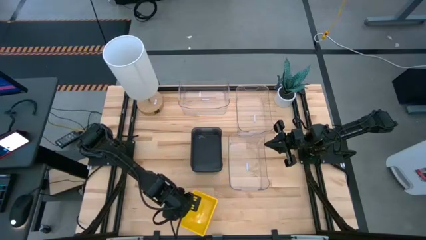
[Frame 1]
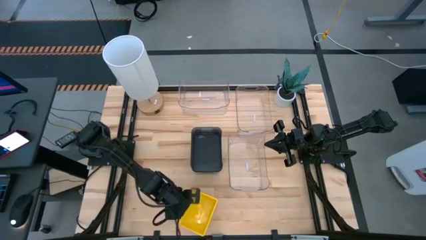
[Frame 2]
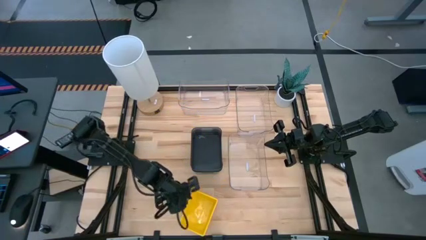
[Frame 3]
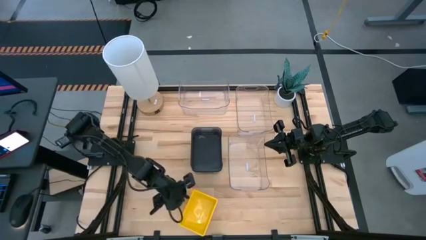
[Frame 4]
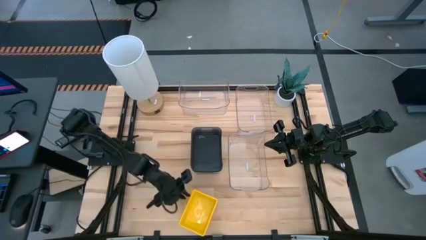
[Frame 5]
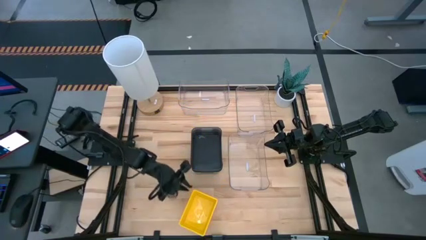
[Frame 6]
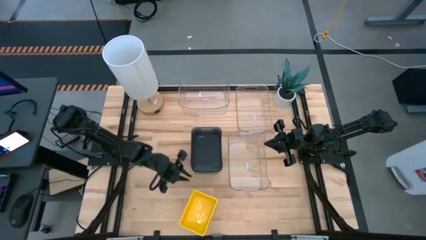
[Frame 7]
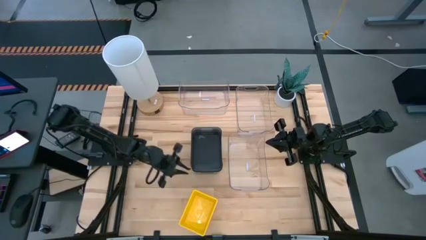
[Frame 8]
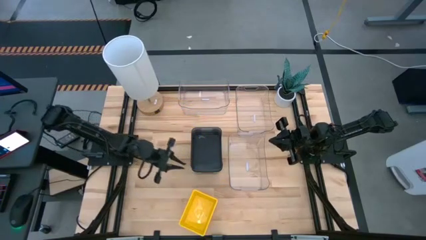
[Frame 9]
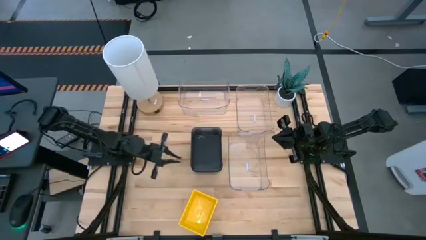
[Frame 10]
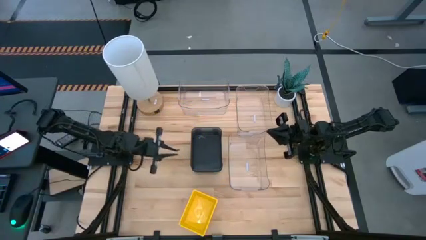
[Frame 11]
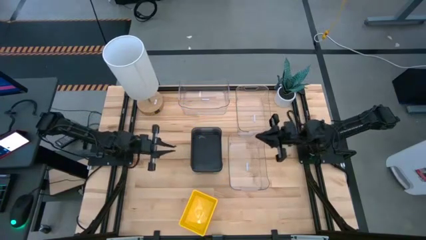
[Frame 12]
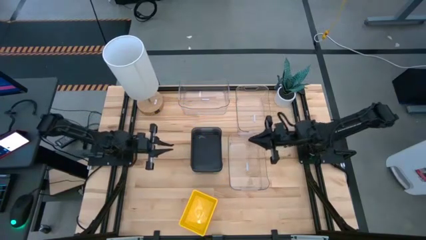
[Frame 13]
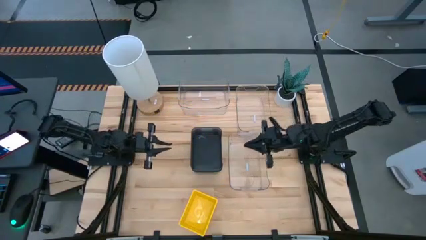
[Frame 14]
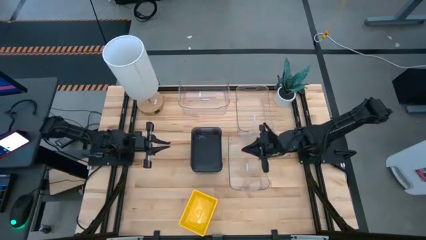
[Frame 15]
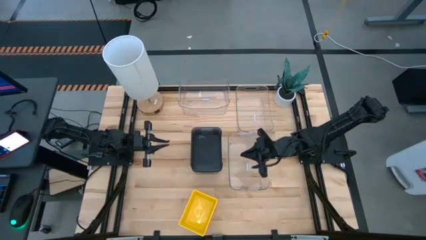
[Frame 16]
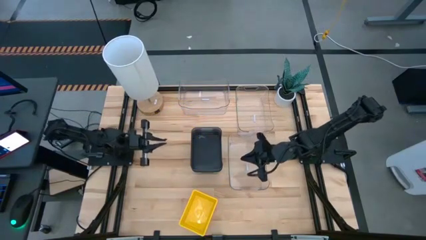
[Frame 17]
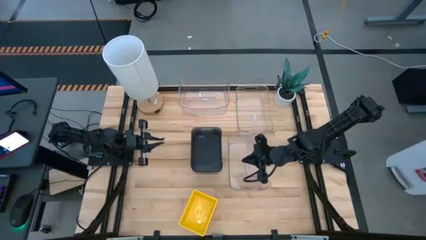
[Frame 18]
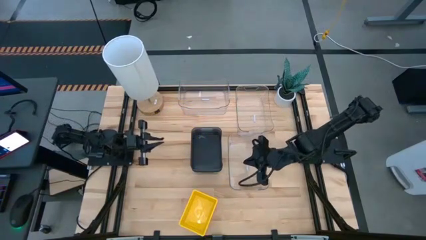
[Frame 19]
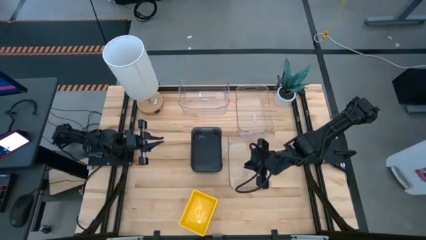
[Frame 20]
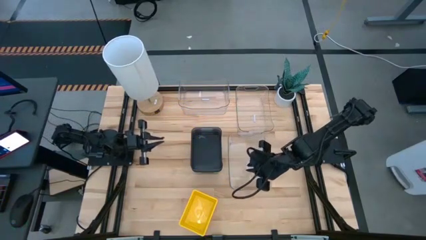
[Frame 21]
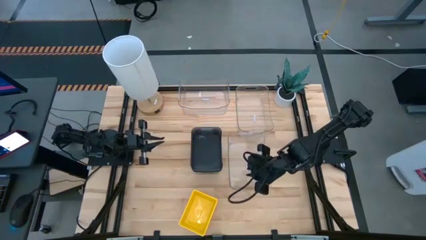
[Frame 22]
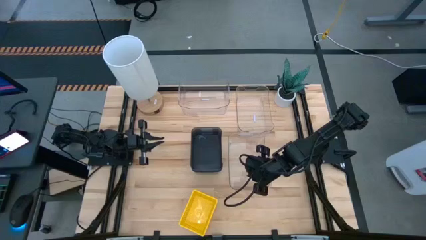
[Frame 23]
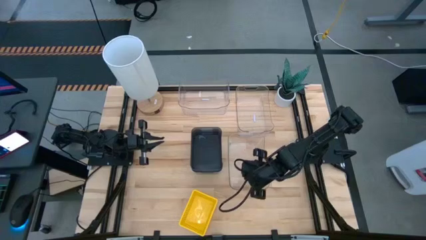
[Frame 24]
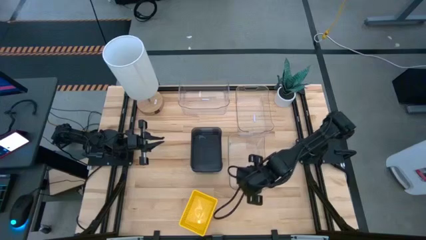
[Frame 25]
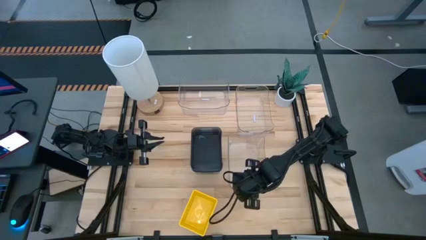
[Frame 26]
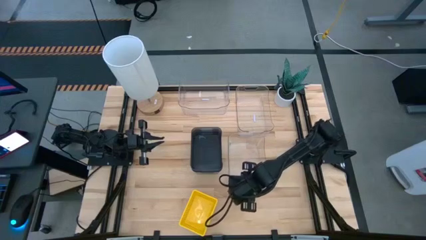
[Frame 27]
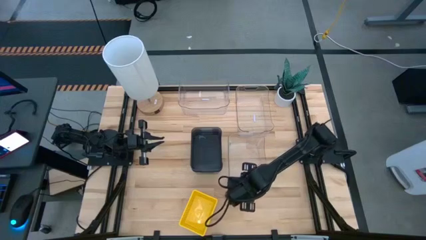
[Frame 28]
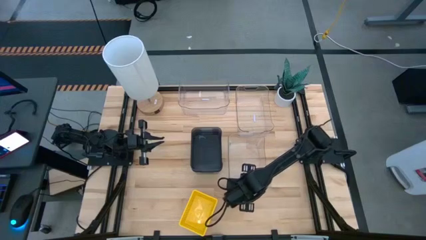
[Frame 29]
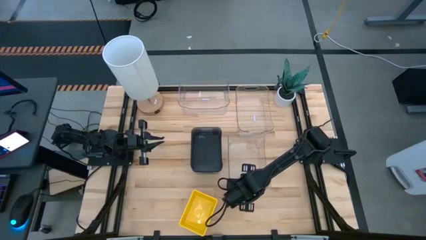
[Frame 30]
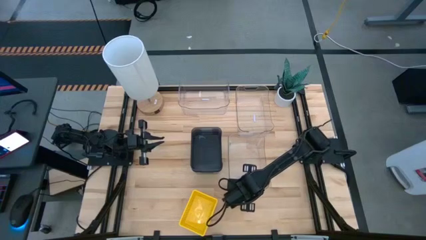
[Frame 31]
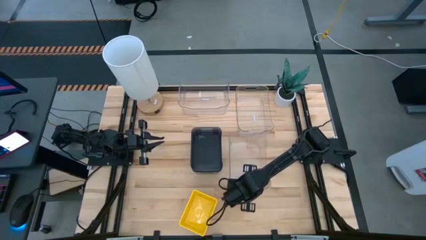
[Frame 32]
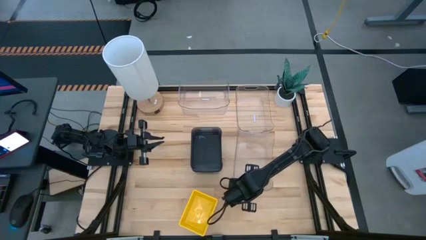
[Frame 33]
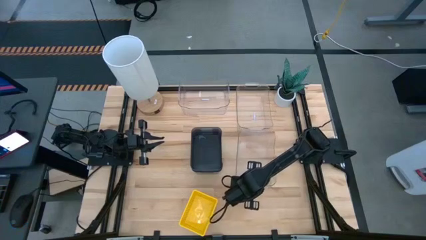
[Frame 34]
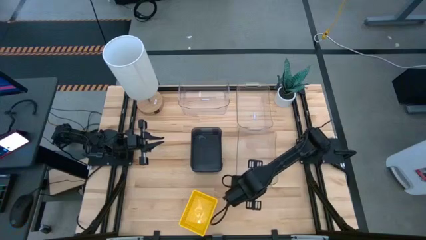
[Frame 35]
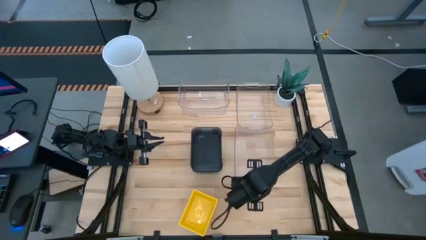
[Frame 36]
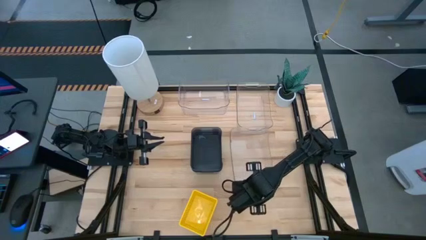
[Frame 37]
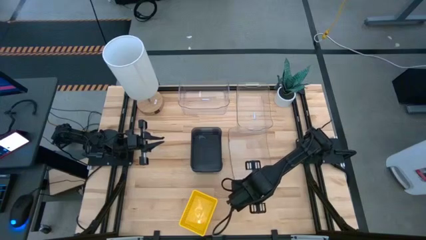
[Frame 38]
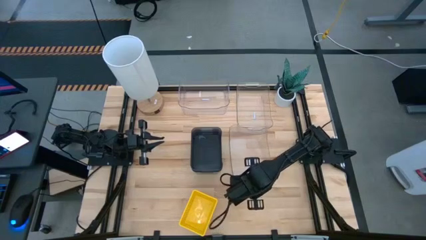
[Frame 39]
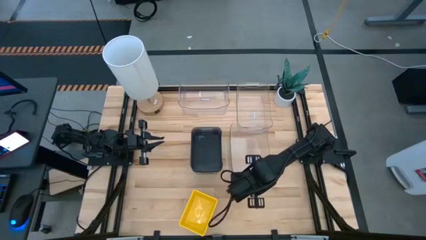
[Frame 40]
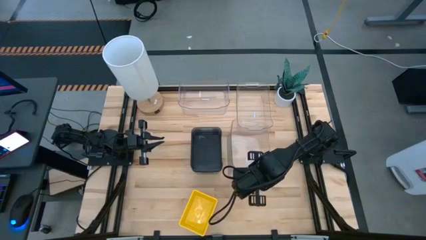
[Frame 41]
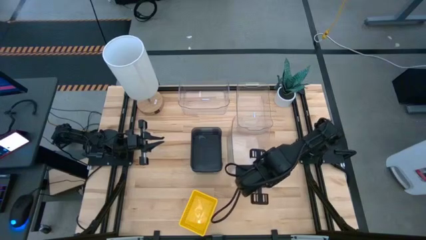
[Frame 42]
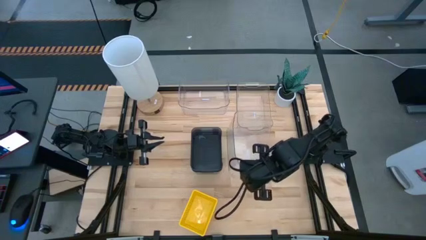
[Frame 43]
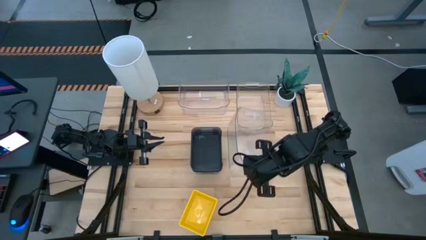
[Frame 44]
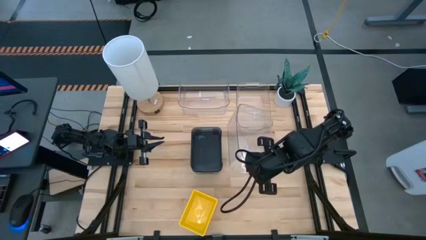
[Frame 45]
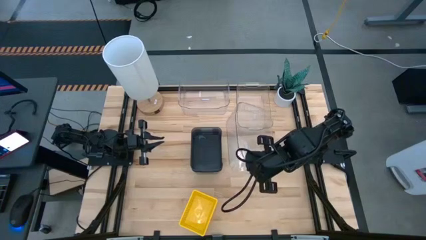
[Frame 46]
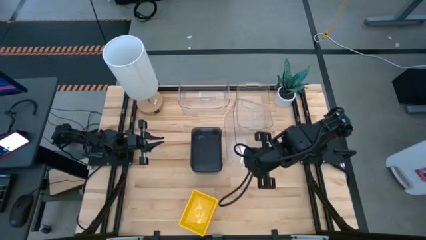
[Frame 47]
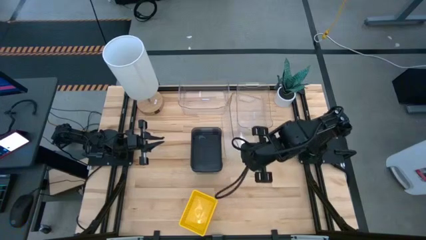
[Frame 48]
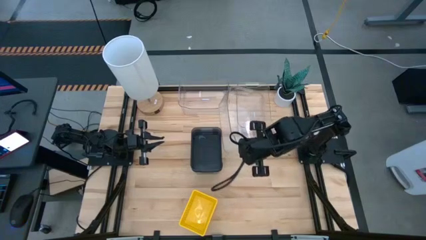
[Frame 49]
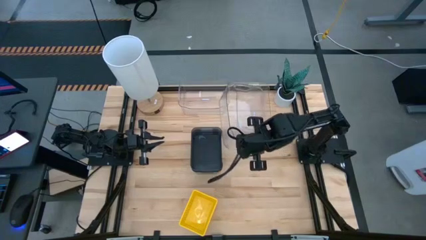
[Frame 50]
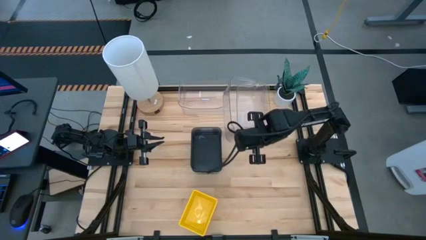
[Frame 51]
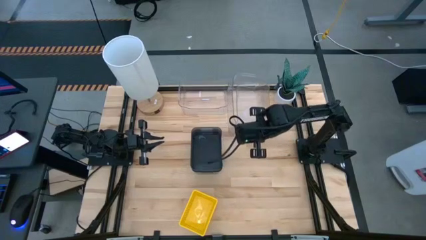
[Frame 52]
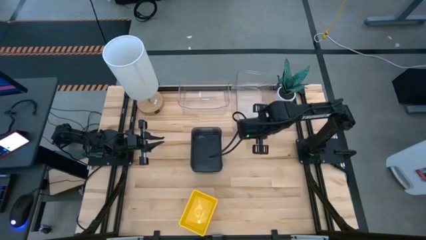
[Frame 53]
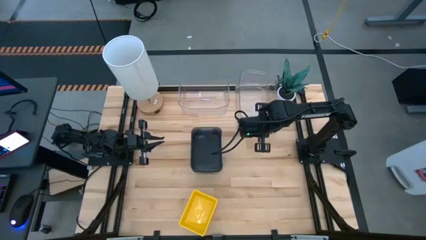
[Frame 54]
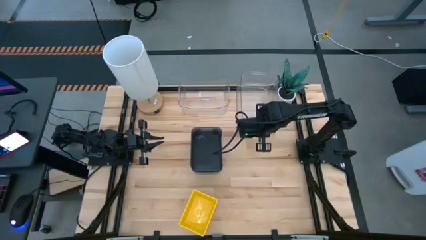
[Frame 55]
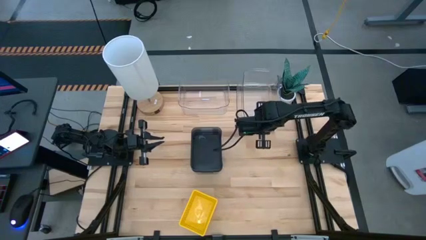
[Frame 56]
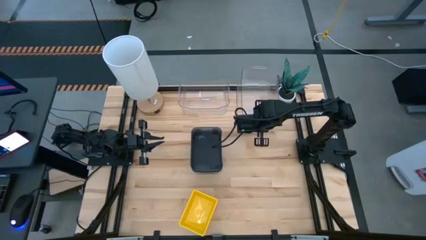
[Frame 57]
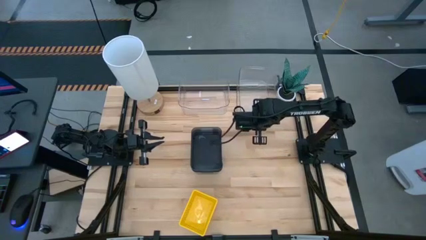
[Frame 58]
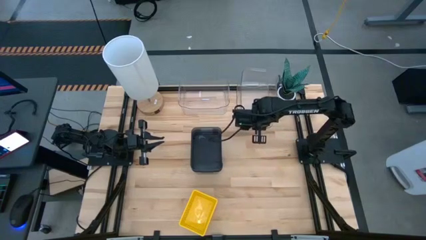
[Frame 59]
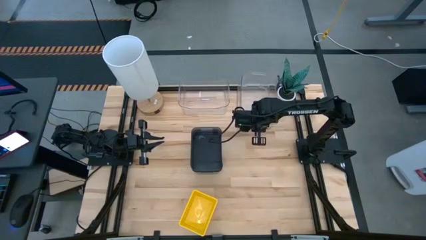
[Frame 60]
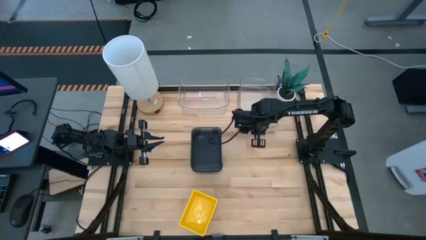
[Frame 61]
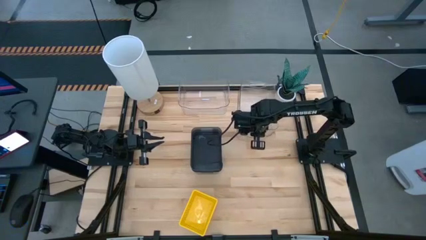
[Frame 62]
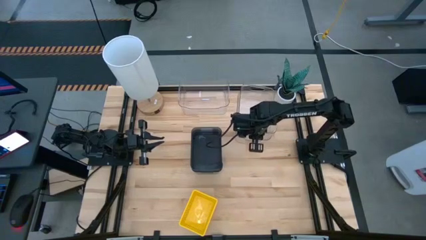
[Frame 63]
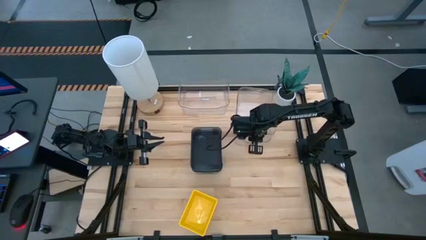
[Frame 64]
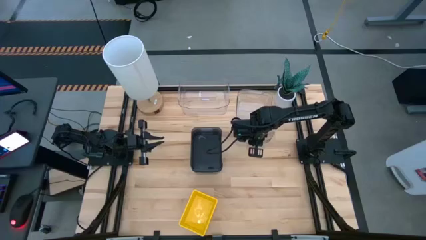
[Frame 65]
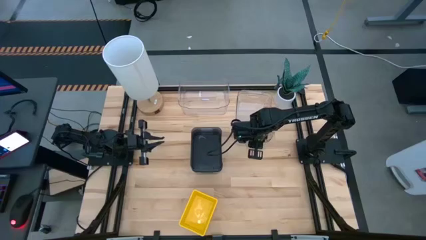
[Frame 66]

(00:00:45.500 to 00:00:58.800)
Stack the bottom transparent bin on top of the top right transparent bin
